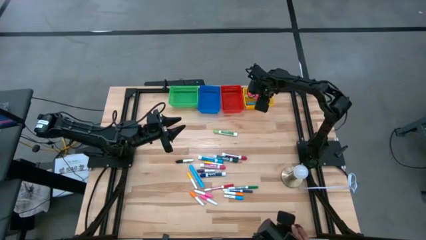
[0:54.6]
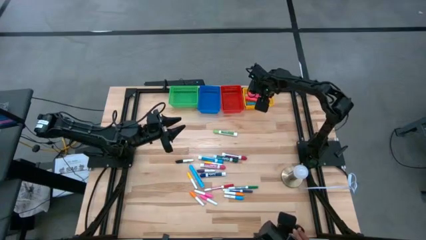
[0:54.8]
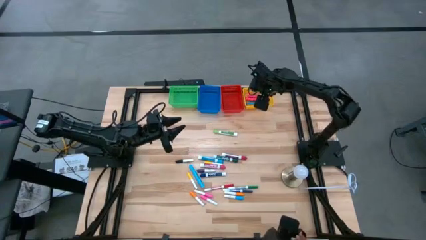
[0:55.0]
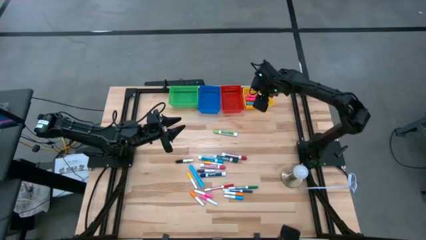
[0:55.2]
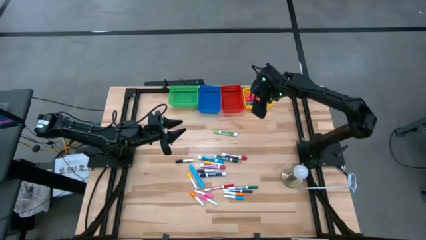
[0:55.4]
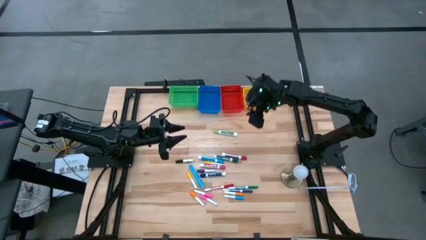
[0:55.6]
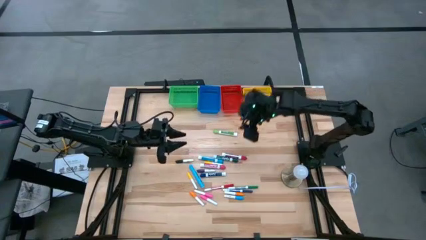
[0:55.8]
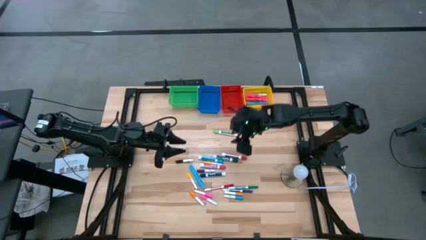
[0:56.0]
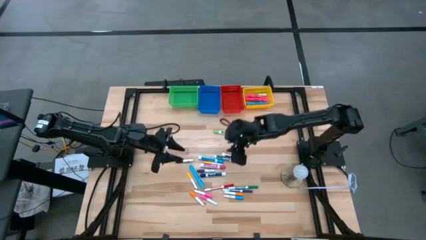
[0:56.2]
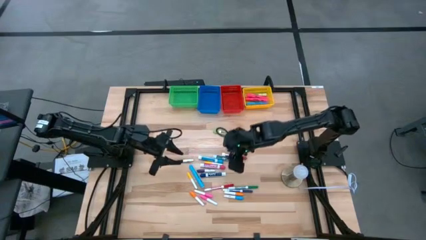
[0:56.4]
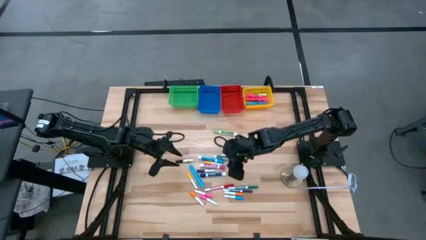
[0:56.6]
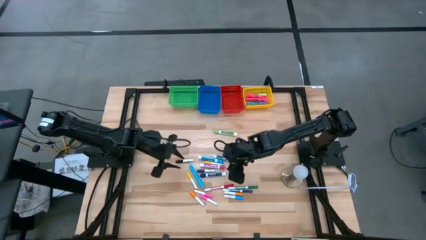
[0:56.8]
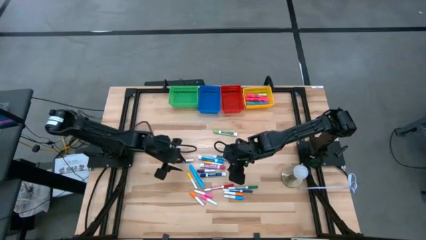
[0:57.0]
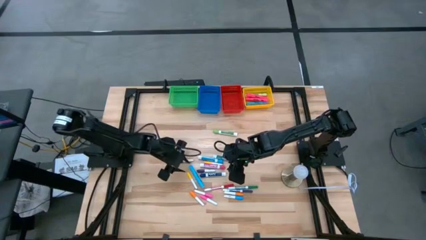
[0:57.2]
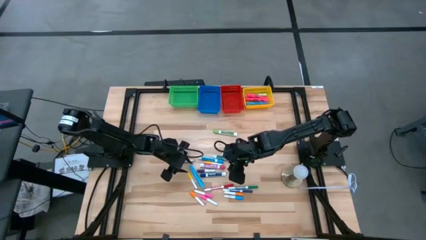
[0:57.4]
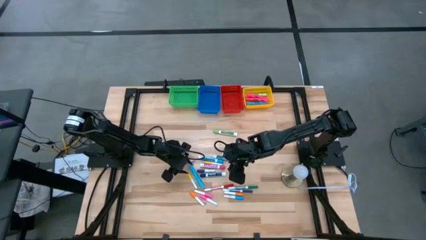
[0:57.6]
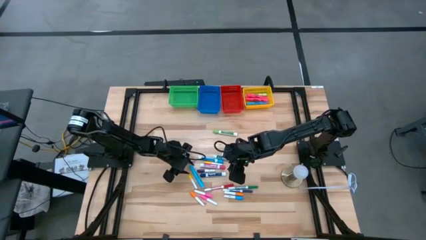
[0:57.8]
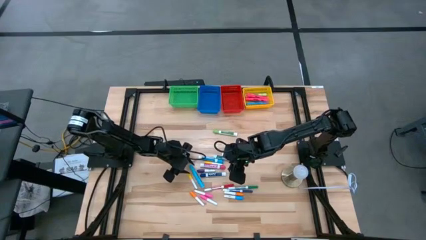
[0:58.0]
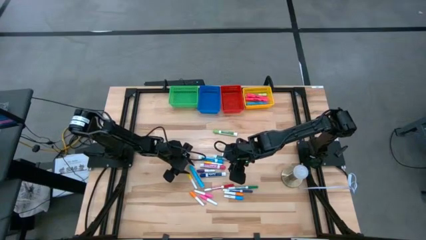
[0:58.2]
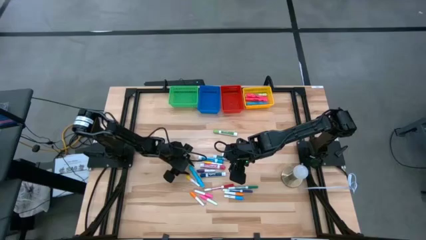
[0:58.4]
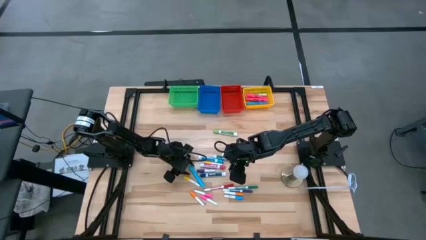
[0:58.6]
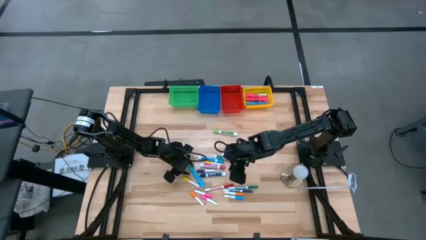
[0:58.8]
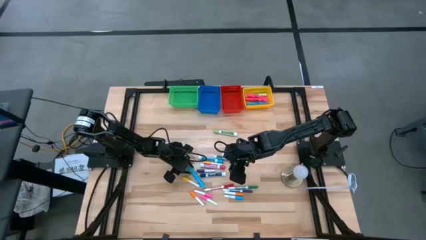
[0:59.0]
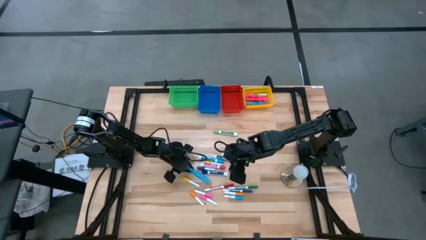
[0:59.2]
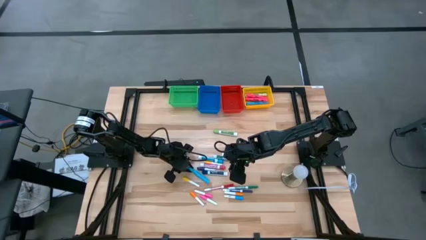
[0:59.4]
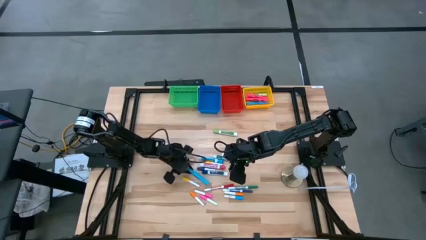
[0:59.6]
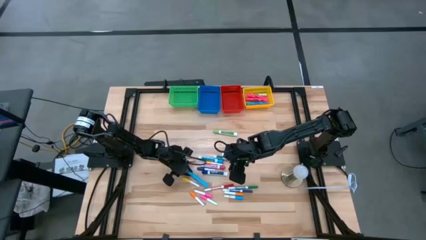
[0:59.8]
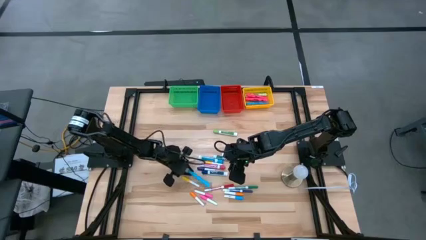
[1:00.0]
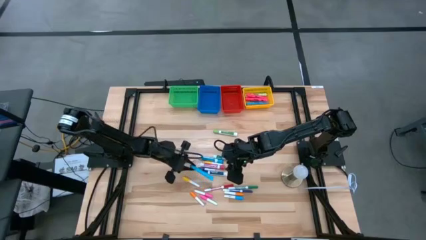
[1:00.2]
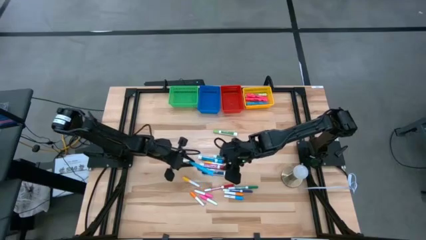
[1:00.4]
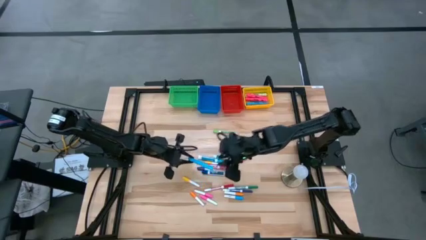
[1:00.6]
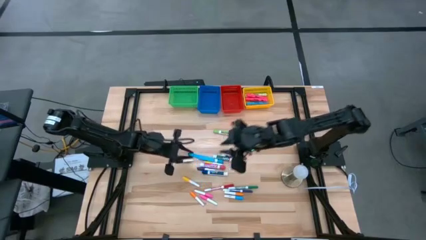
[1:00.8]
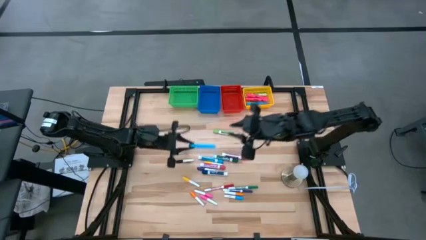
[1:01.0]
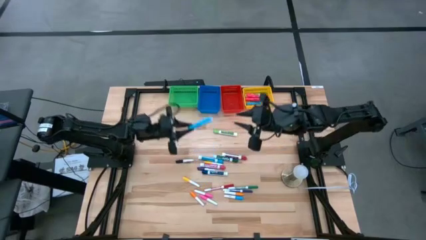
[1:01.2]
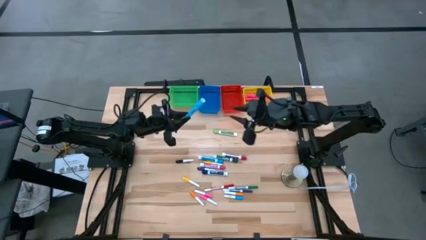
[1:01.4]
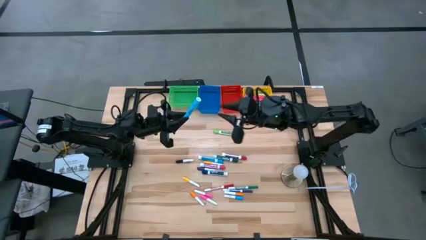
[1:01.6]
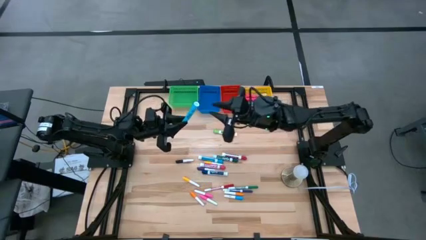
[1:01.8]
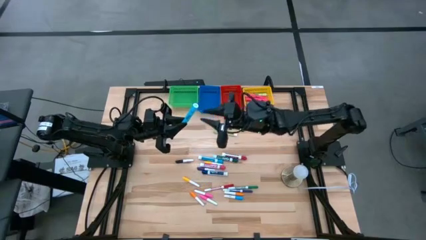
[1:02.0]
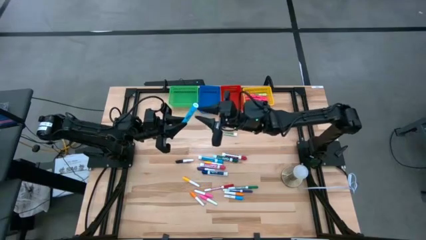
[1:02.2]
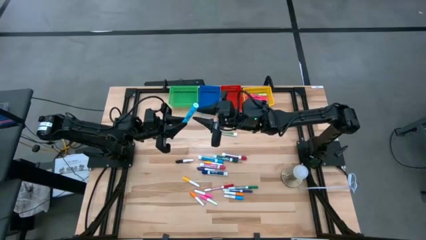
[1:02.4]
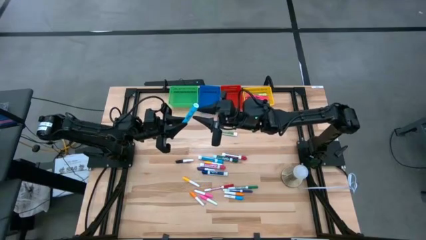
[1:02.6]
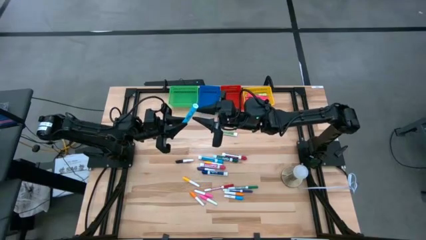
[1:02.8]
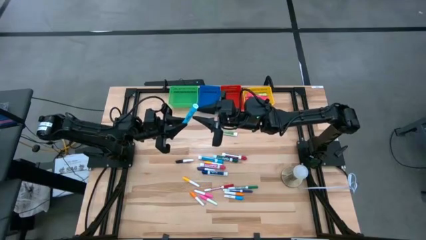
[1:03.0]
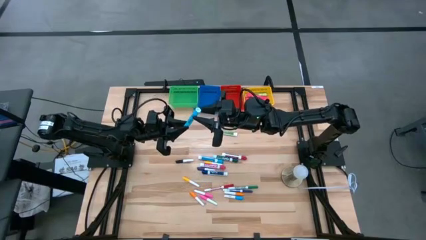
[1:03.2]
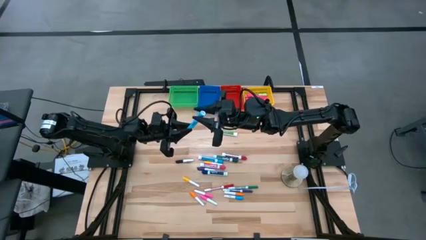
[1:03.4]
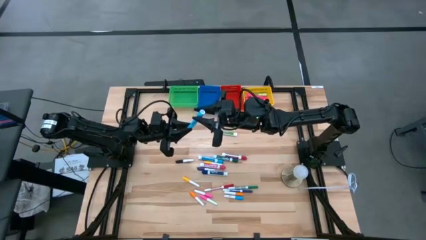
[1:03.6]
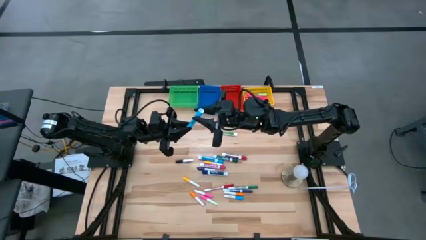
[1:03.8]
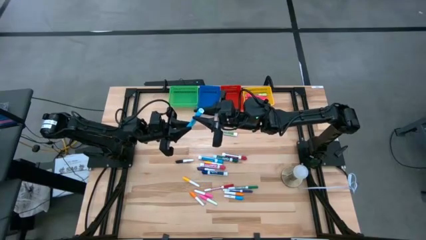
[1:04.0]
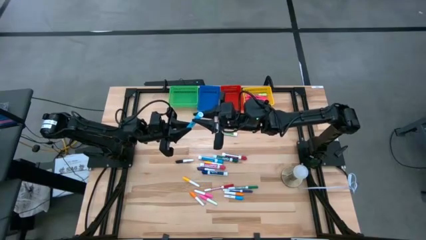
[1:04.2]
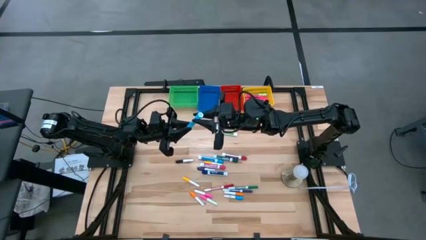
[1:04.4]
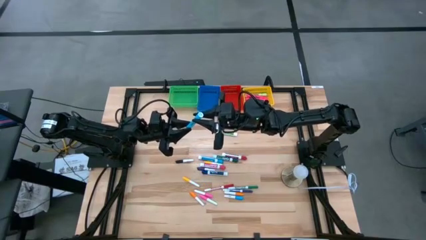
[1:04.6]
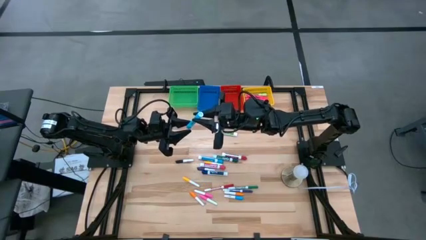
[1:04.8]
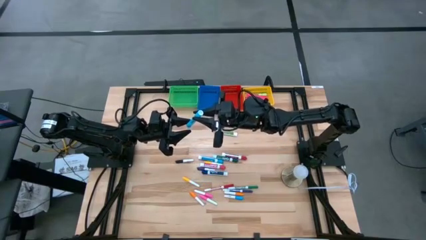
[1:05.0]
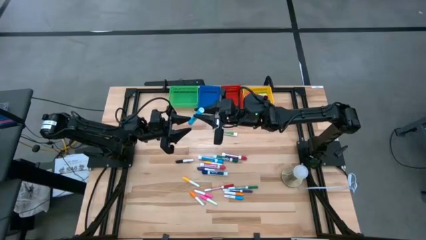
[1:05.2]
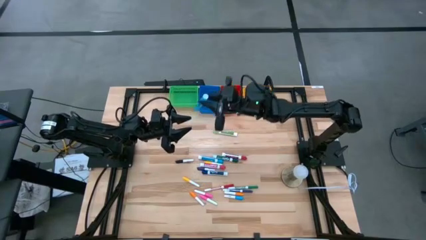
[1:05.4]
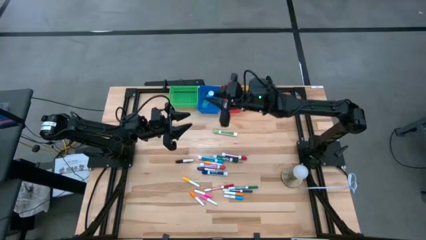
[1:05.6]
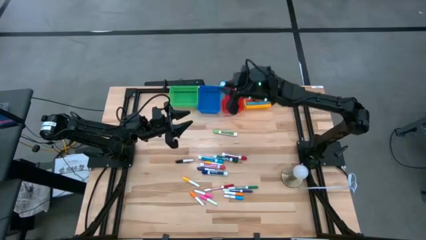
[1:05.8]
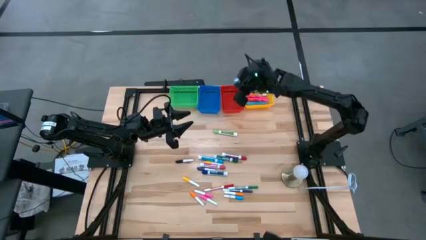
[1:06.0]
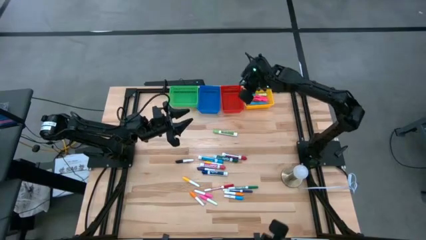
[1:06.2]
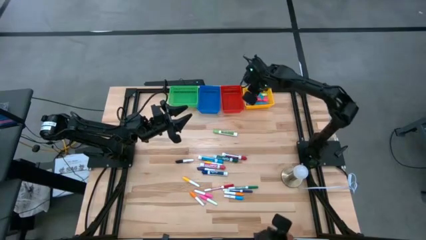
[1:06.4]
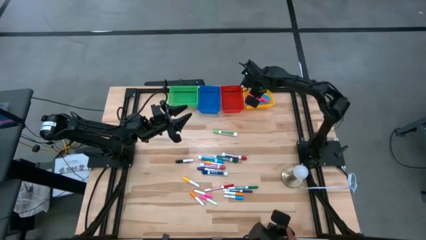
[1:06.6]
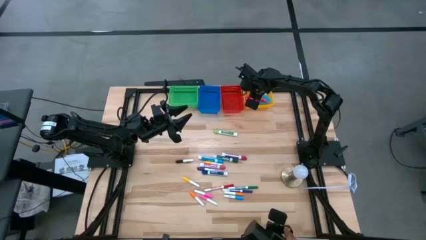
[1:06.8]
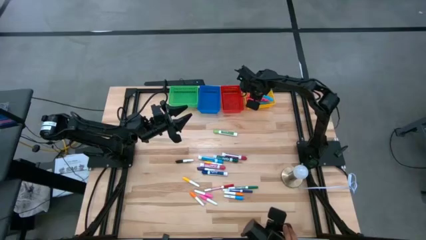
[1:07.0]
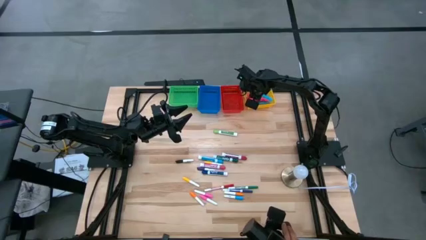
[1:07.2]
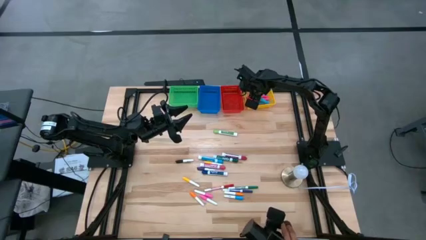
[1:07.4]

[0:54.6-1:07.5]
Task: Pick & Place Markers
Put the large light blue highlighter pen into the yellow bin

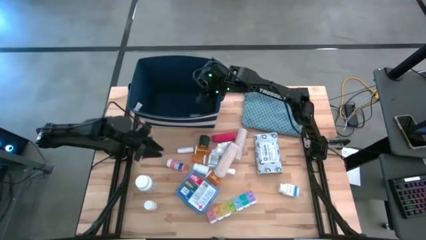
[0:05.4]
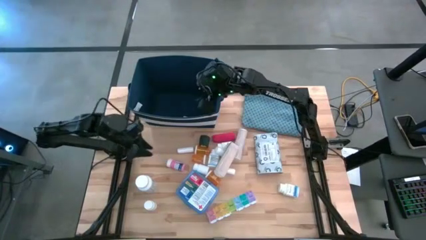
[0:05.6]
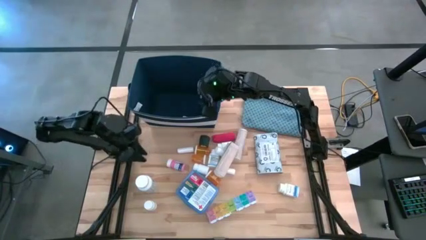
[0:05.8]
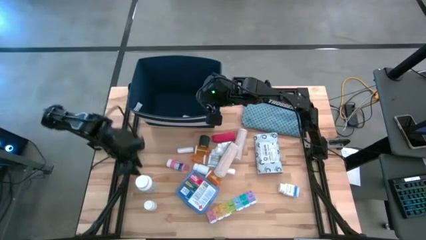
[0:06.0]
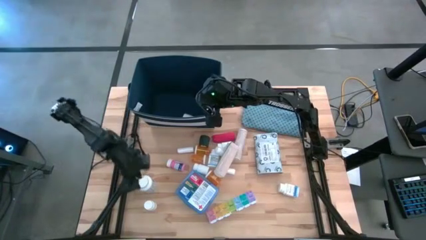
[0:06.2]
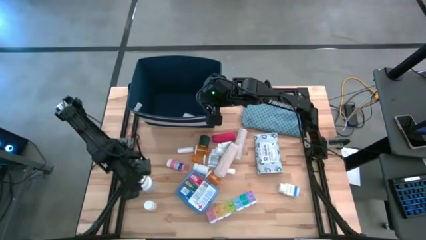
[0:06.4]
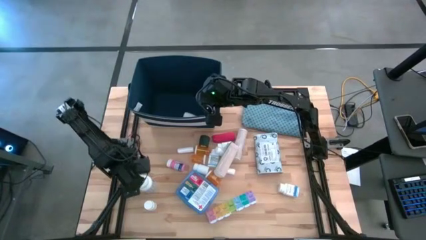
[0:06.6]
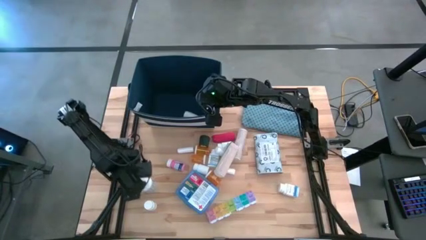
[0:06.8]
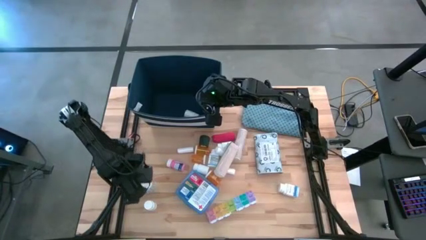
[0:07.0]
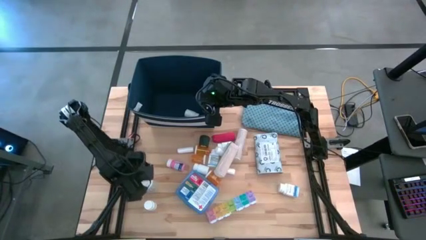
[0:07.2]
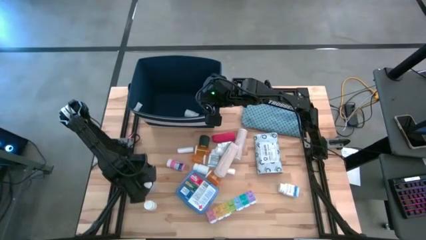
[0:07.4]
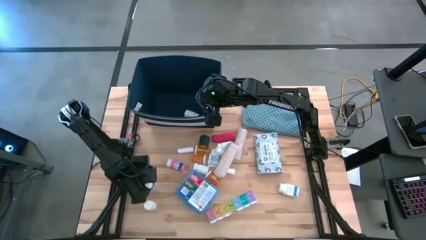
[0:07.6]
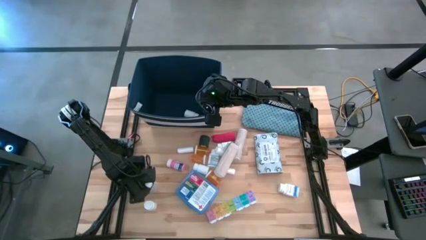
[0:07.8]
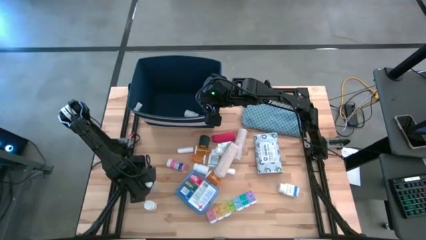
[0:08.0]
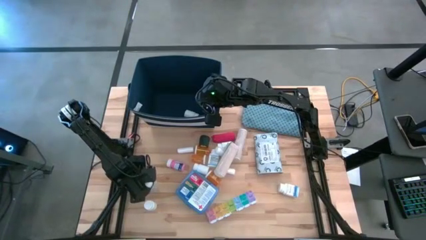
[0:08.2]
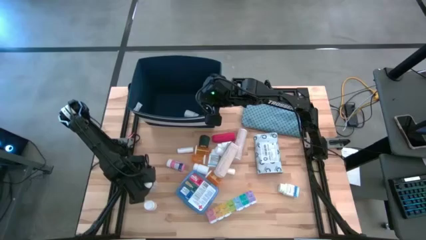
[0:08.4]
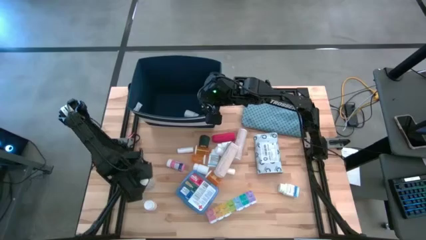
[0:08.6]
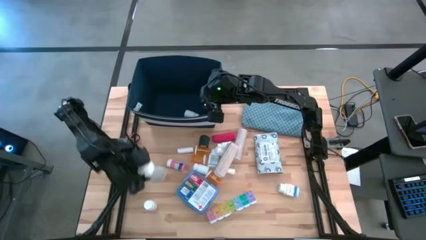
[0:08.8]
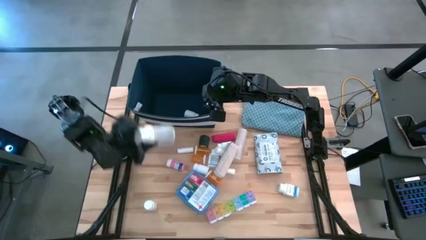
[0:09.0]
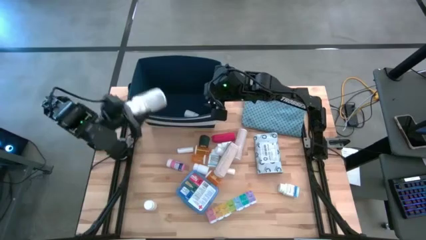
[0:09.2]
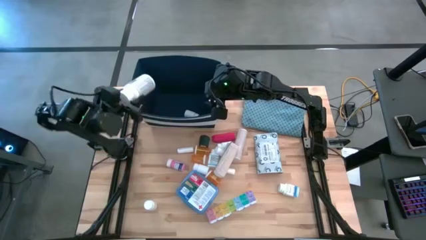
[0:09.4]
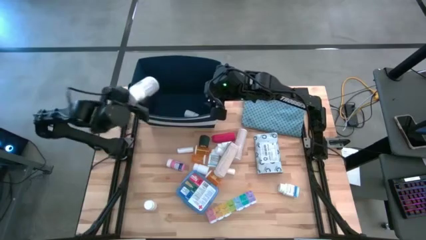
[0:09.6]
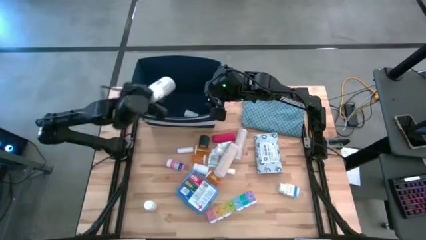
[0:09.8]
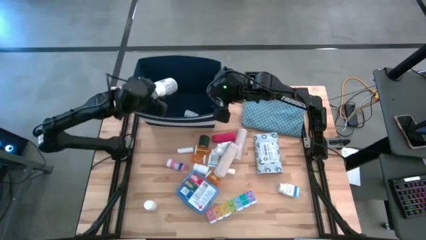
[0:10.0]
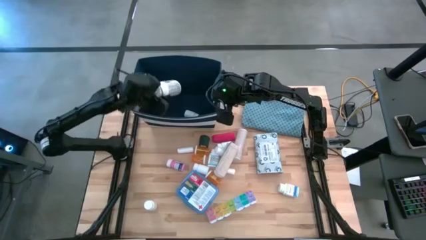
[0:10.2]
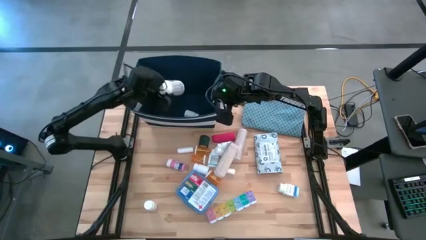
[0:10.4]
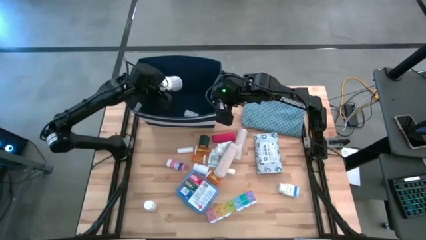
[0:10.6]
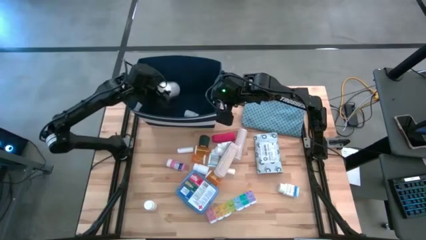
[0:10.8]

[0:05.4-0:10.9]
Task: Pick & place medical supplies in basket/bin
Put the white and purple pill bottle into the blue bin
